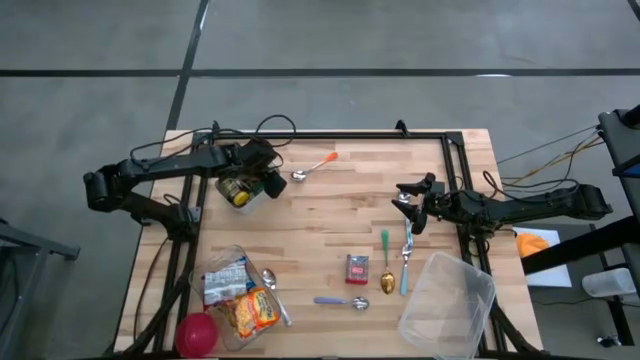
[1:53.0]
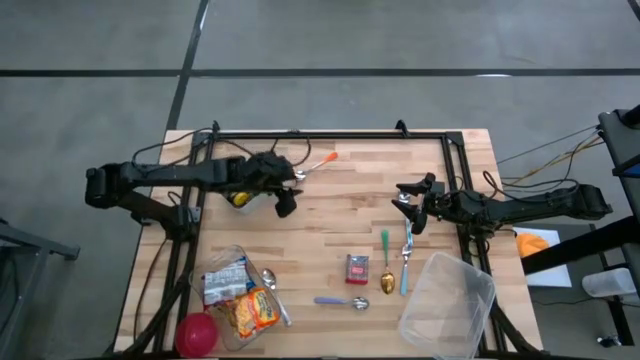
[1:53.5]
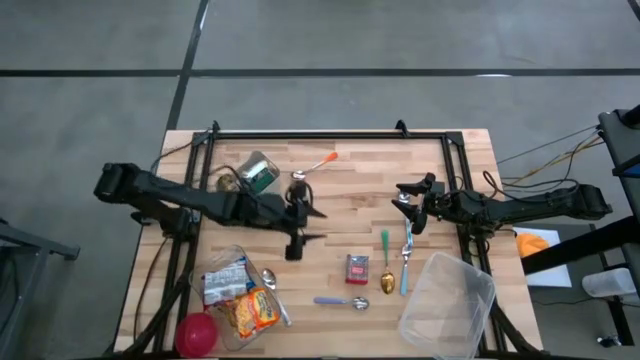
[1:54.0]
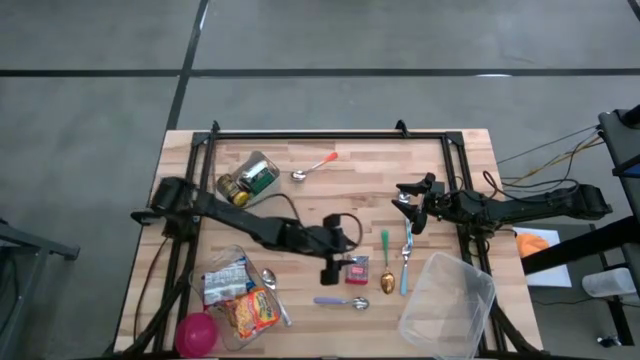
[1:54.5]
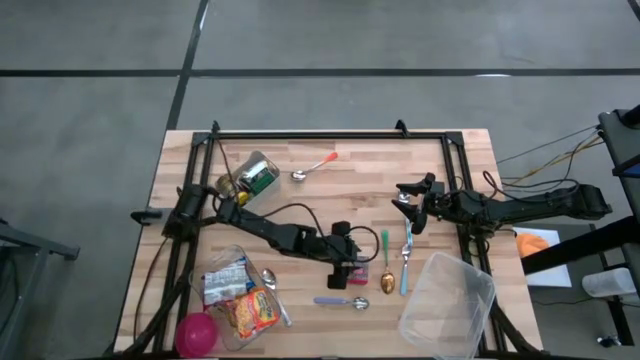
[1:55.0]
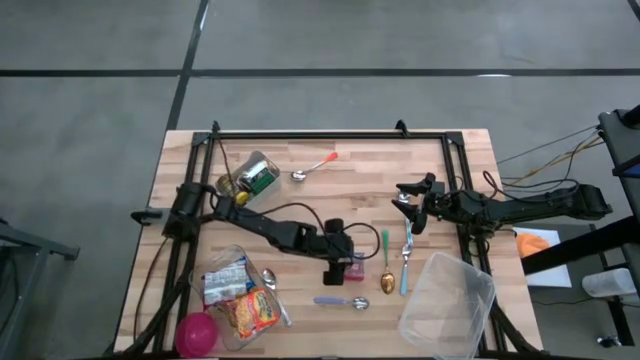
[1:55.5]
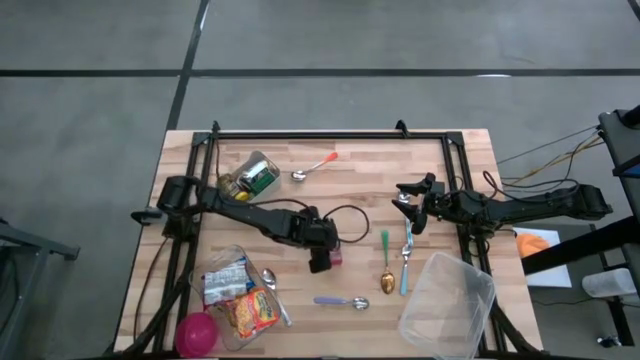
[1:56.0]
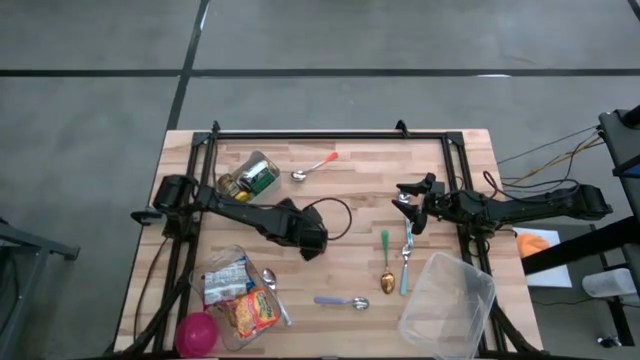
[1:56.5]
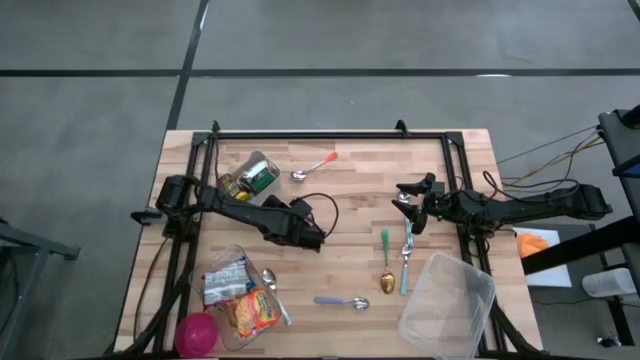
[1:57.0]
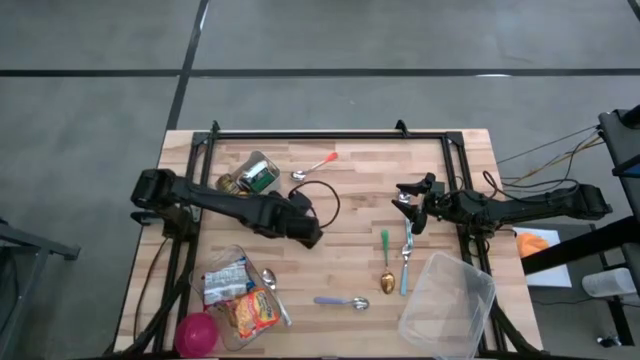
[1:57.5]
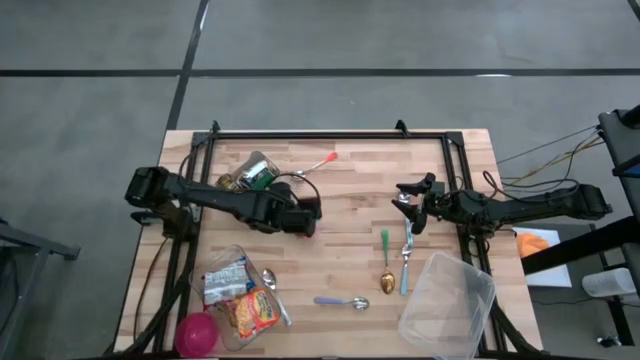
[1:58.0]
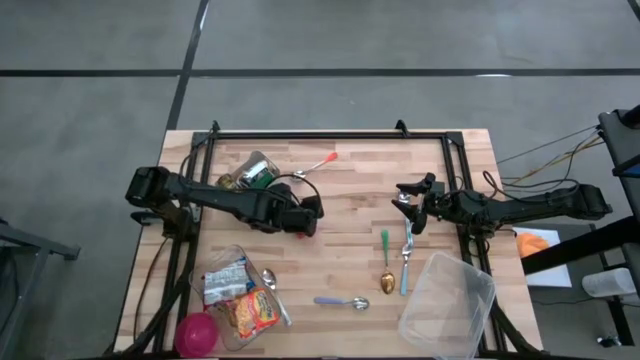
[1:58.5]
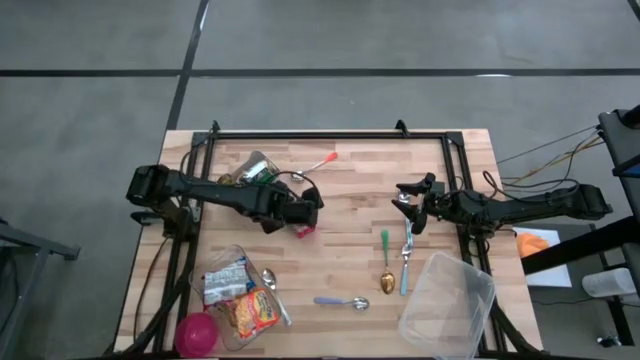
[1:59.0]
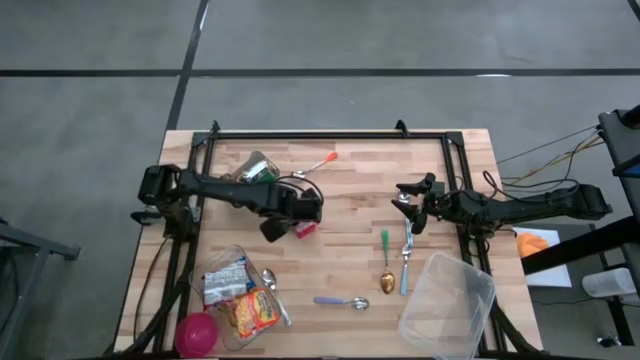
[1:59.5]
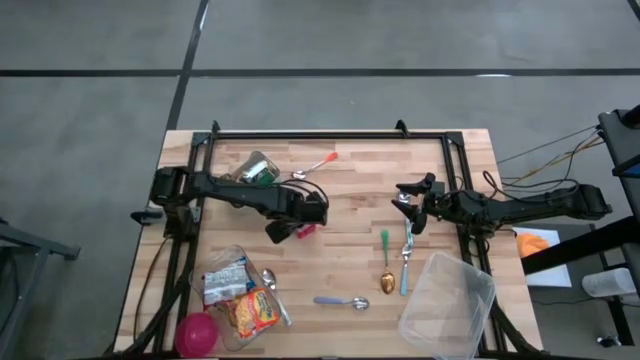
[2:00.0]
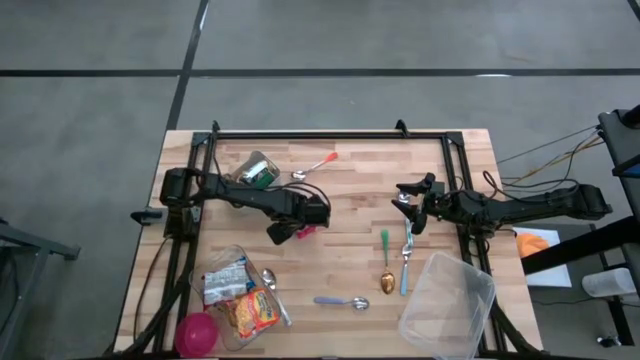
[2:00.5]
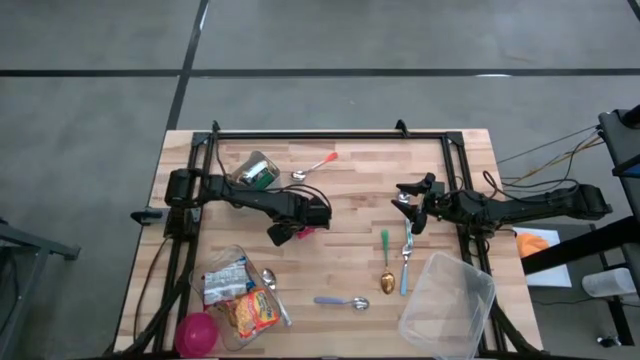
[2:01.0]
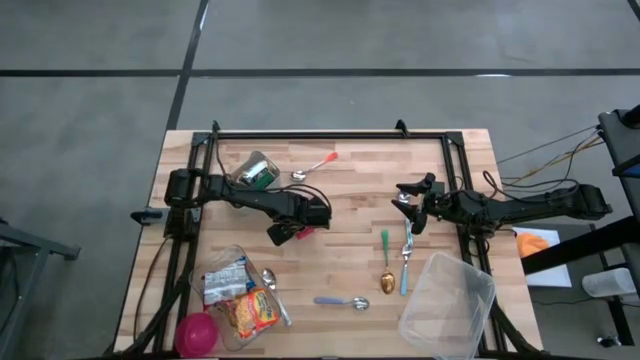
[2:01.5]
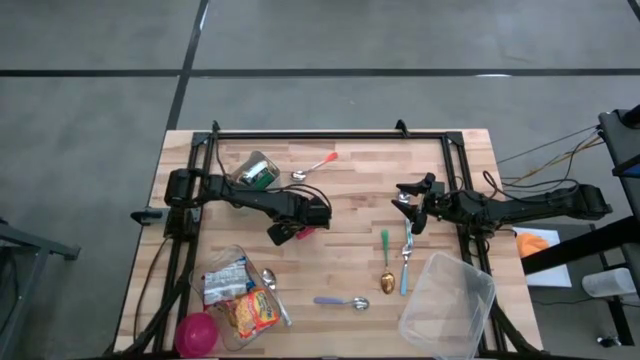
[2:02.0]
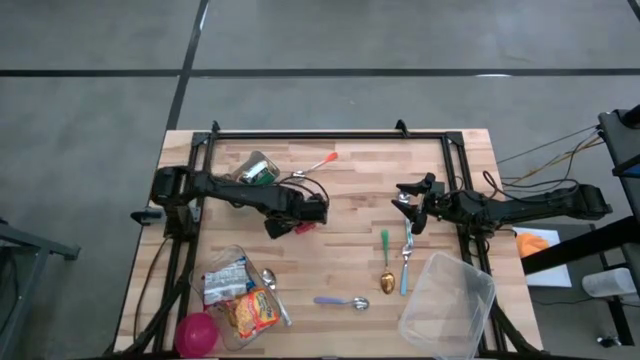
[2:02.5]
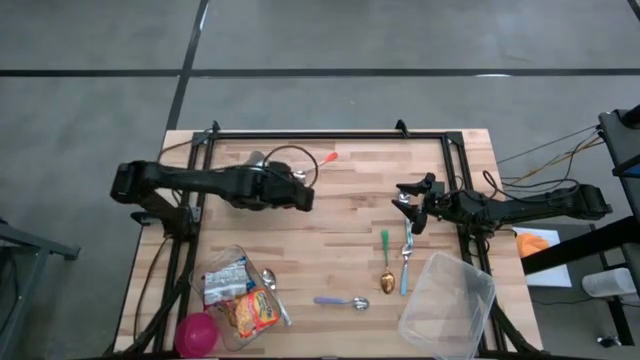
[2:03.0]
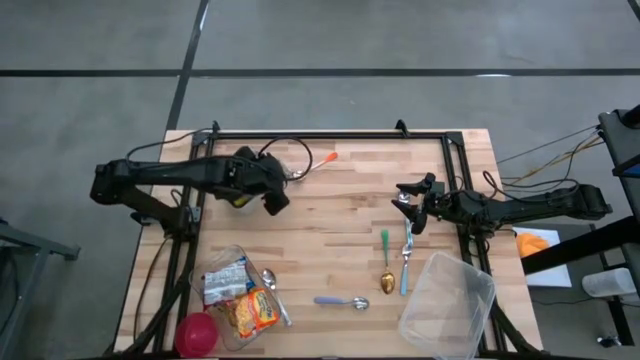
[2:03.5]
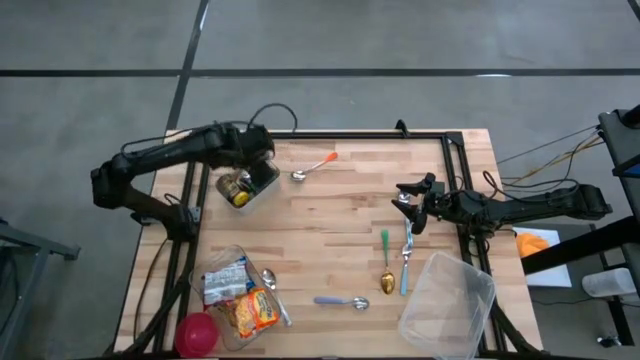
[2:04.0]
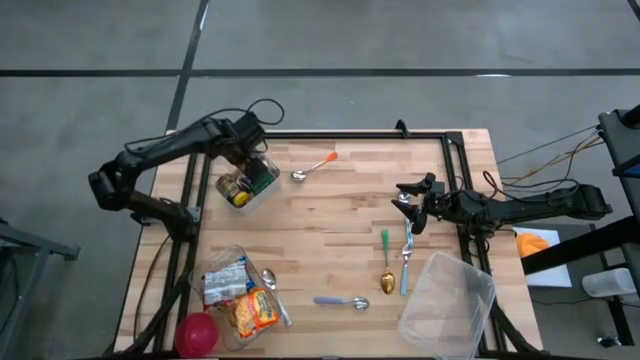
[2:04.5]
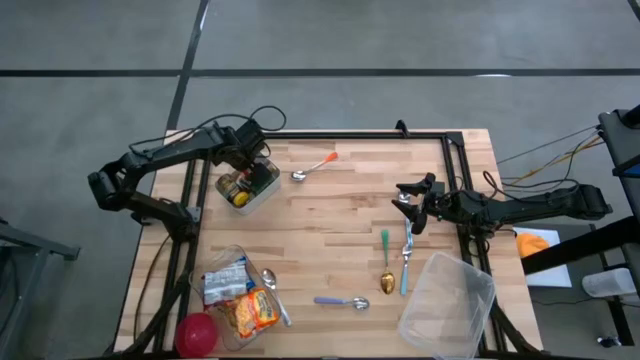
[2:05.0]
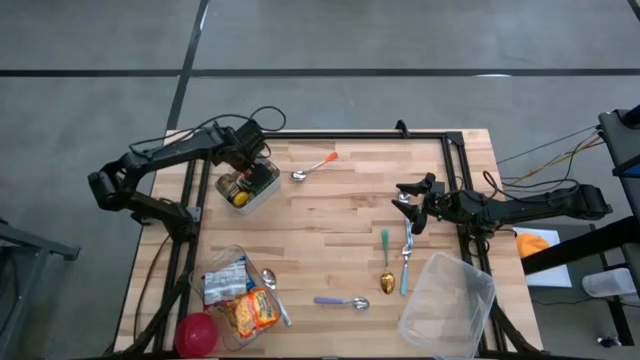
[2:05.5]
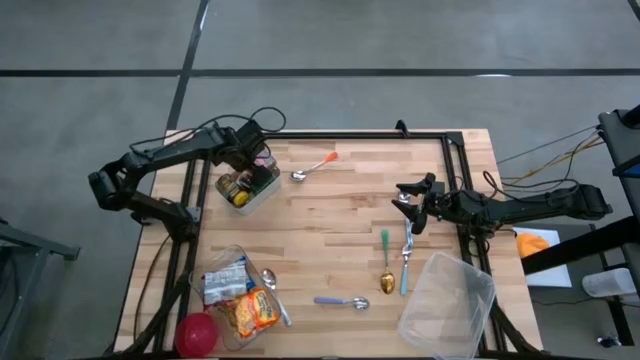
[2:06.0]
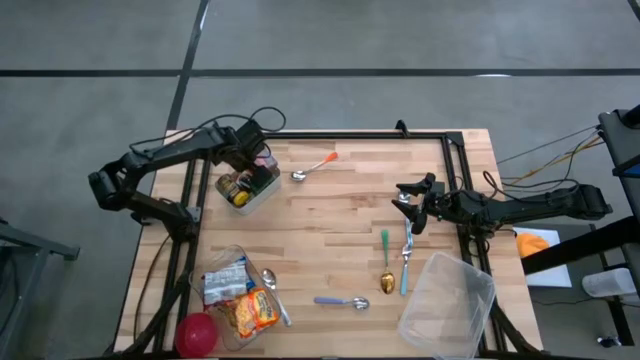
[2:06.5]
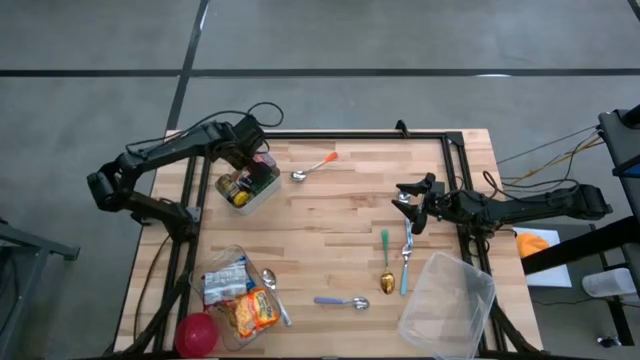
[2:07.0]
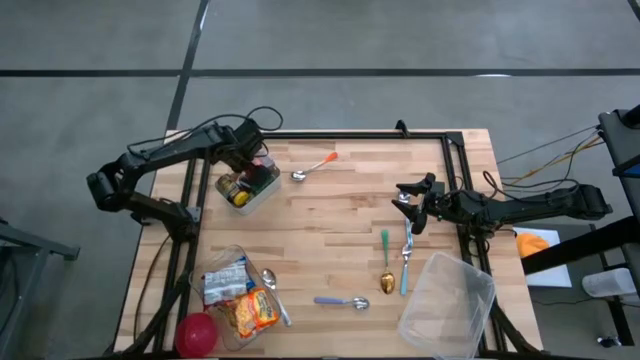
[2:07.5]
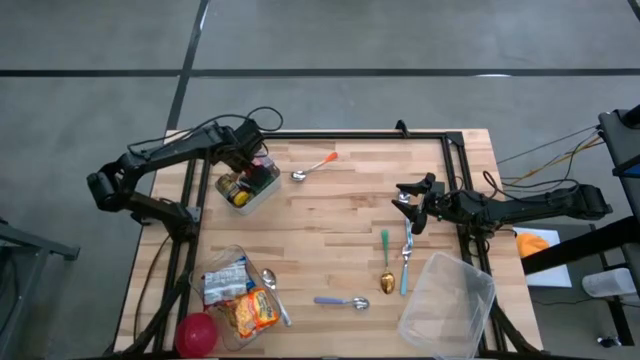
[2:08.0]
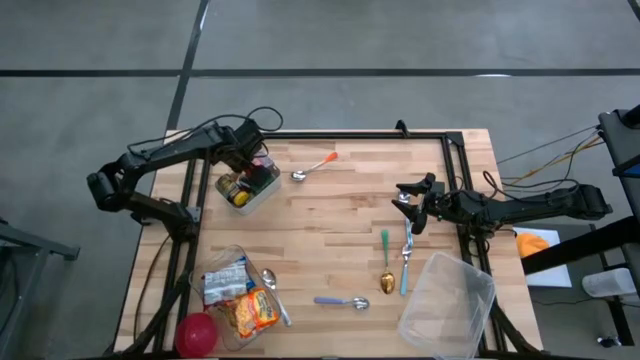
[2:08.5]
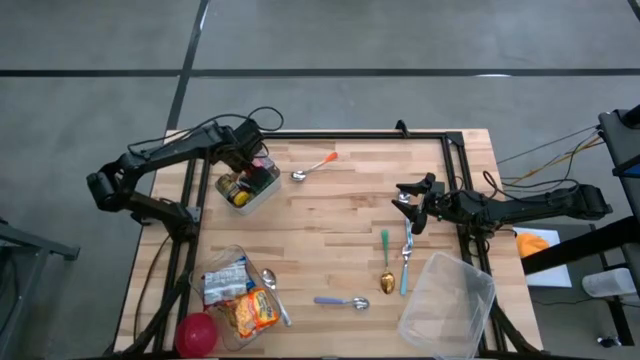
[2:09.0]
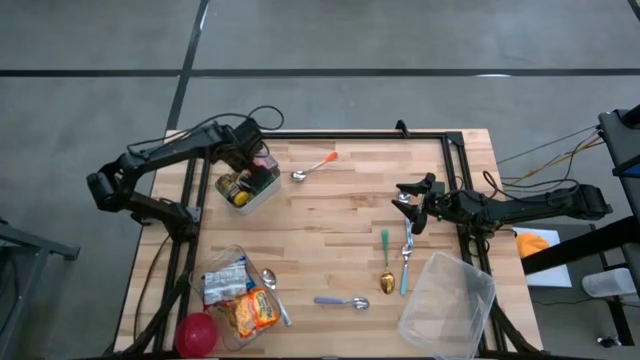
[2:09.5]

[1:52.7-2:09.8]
Put the red seasoning can into the gray bin
